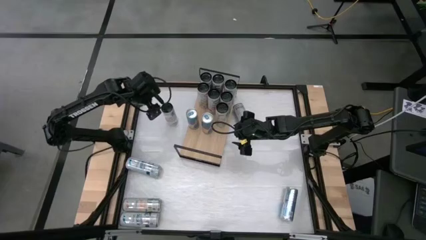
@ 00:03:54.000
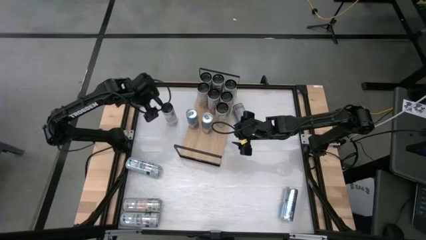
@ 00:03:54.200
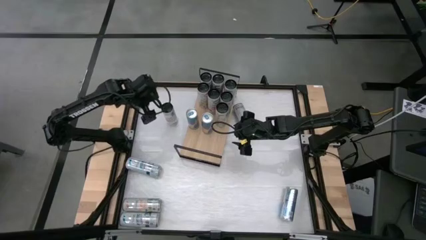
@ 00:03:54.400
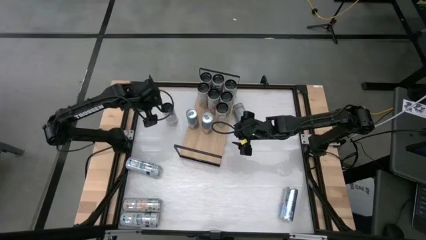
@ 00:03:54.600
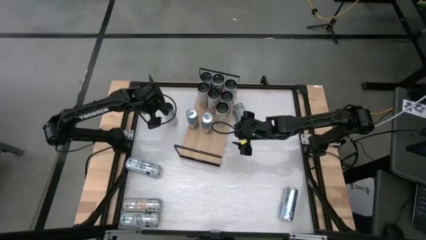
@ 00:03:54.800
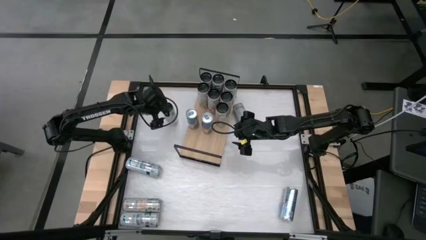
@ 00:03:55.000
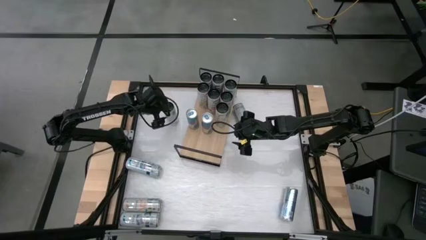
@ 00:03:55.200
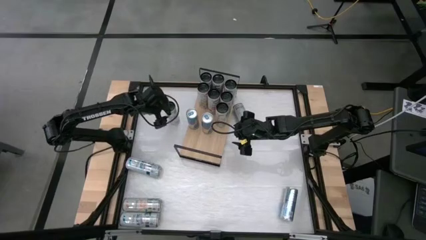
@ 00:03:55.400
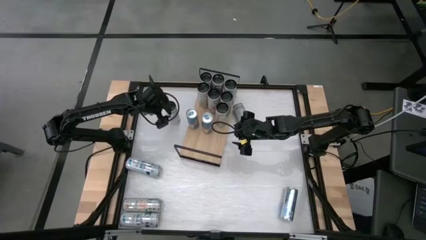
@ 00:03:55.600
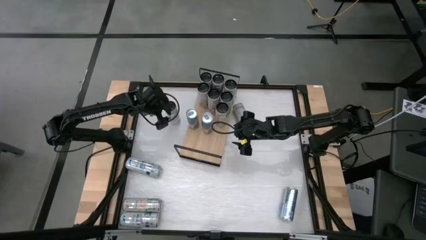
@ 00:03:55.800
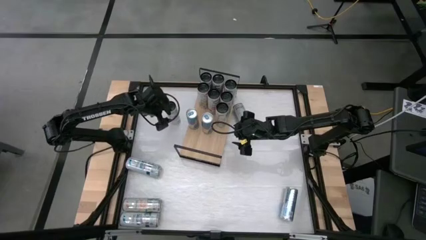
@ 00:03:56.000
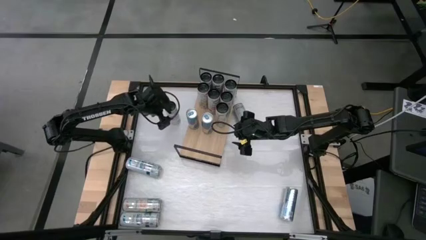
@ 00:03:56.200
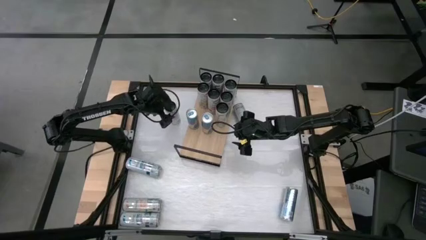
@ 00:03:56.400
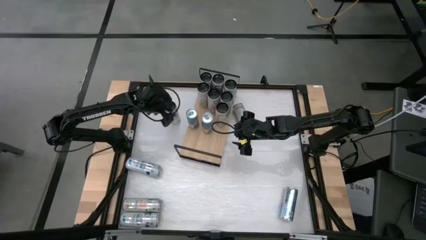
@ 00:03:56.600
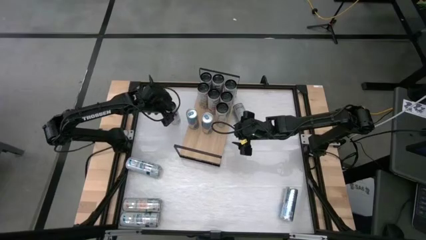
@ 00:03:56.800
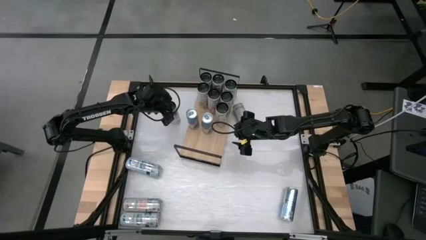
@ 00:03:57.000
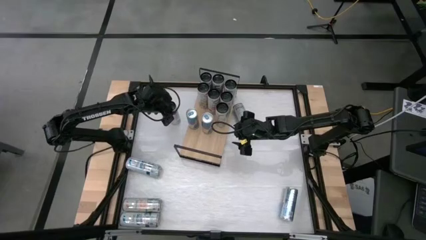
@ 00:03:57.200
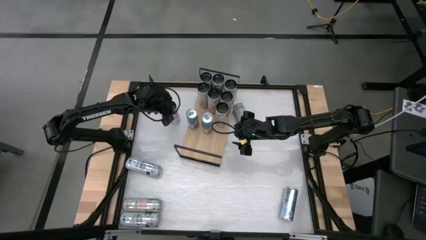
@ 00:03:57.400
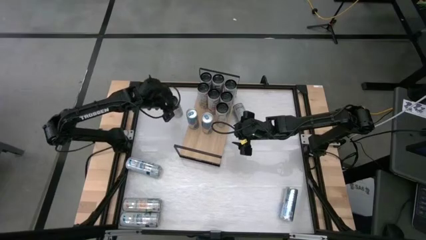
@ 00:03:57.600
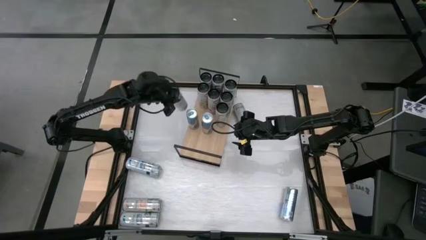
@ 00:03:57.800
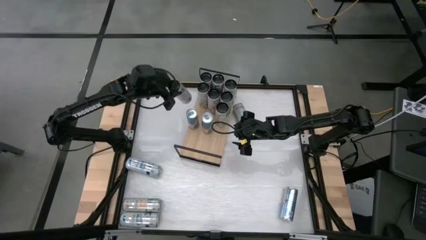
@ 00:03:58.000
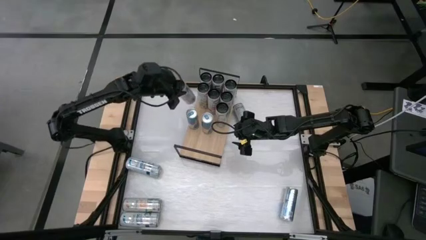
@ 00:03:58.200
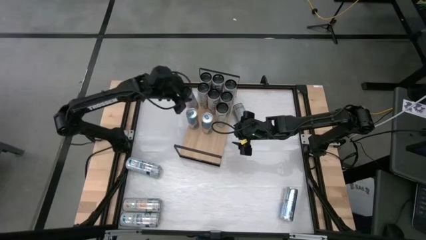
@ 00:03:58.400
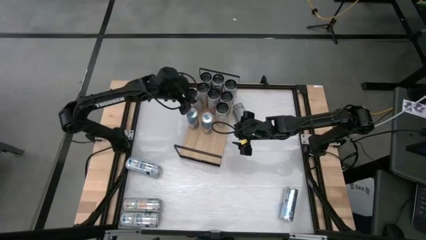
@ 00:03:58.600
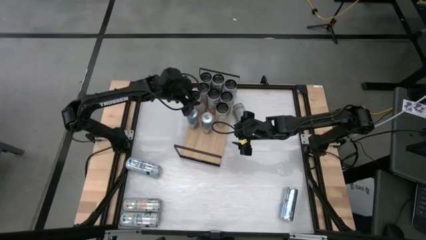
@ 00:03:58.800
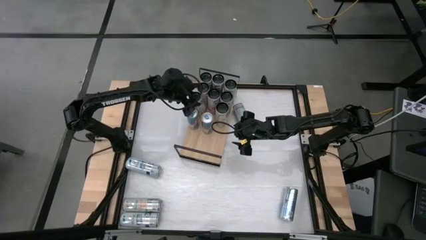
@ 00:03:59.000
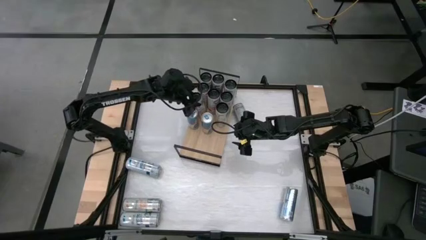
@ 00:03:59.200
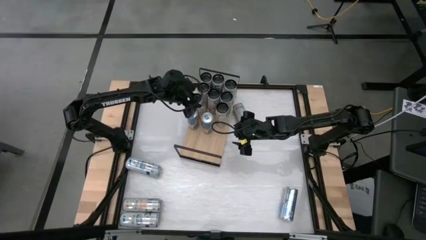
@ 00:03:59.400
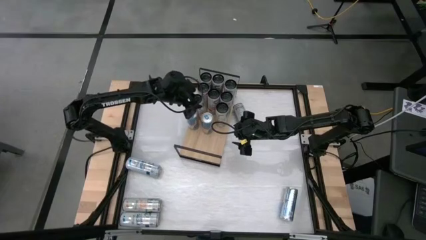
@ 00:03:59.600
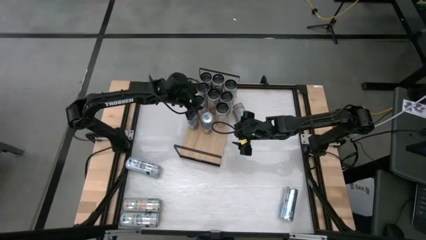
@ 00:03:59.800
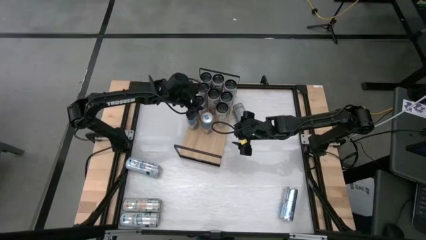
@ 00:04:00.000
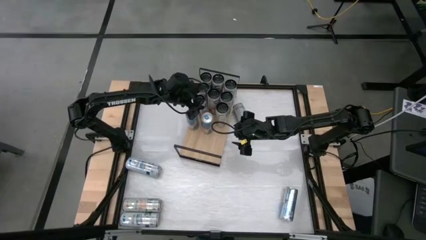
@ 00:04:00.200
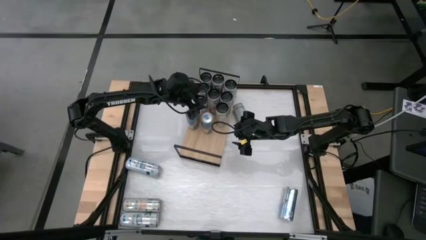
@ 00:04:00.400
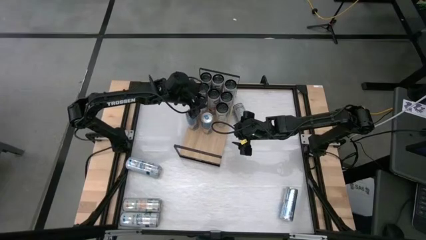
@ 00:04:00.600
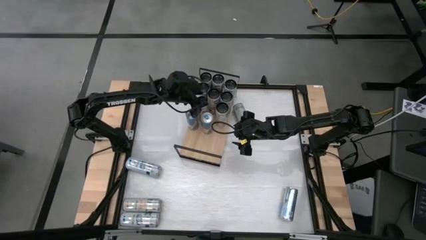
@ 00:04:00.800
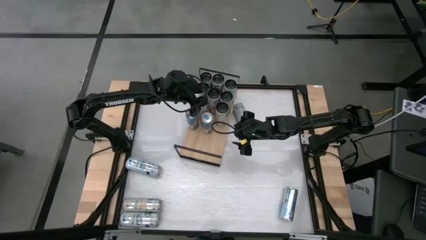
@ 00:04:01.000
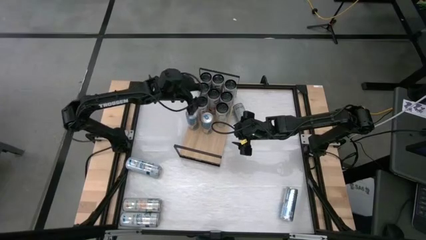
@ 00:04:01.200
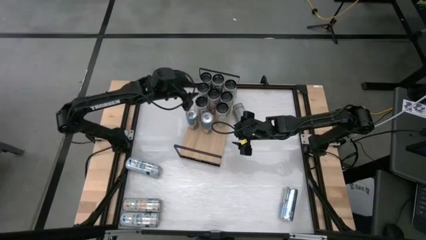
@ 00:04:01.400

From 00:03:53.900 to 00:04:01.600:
Task: Place canned beverage on shelf
Put the bottom left pink soda can on the shelf aligned with the other pink soda can

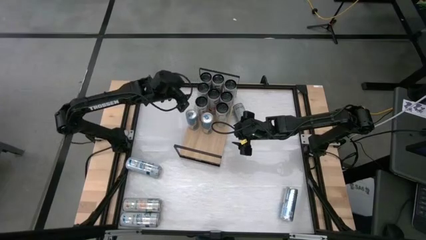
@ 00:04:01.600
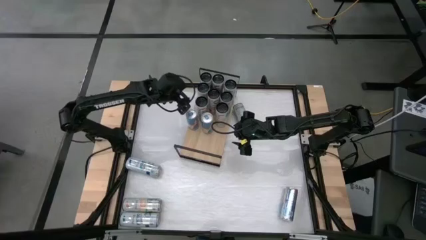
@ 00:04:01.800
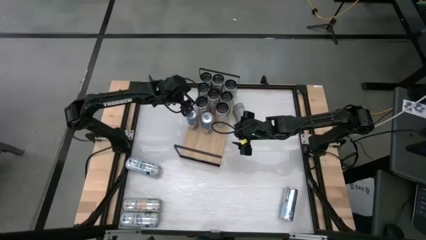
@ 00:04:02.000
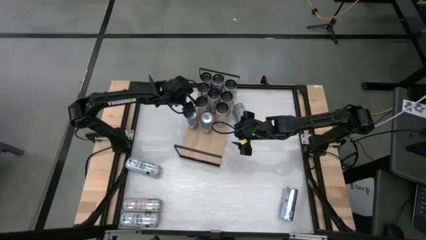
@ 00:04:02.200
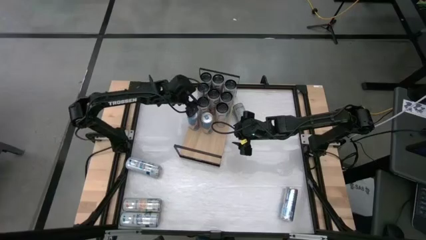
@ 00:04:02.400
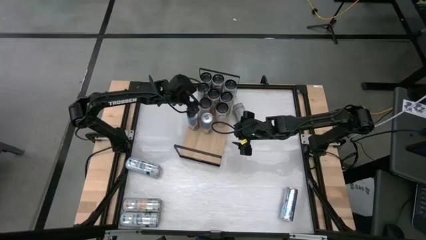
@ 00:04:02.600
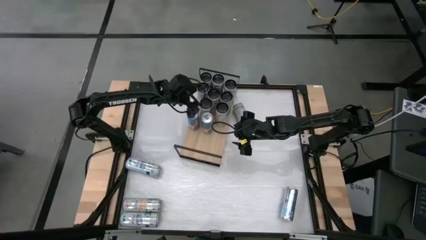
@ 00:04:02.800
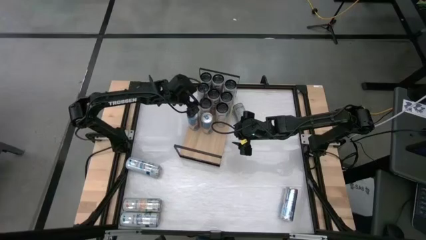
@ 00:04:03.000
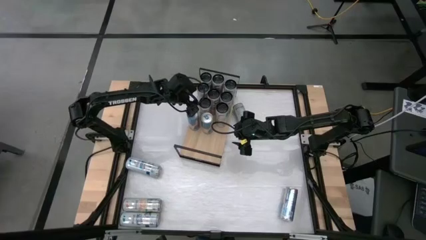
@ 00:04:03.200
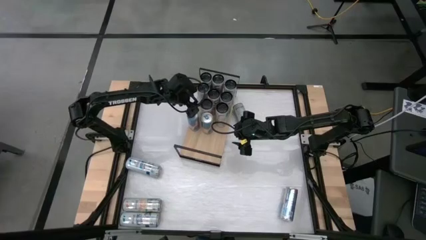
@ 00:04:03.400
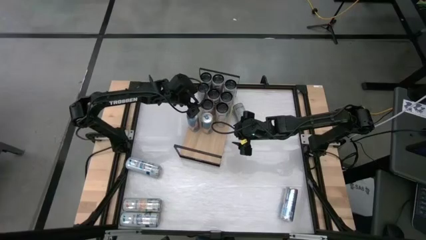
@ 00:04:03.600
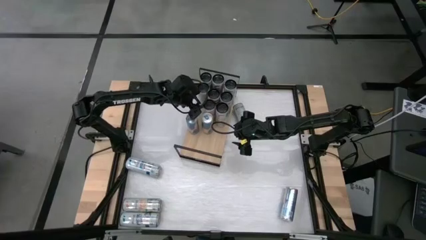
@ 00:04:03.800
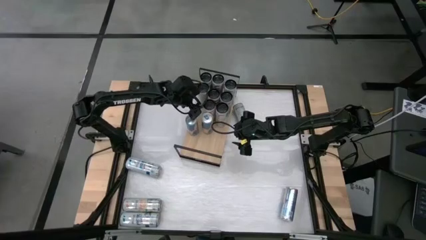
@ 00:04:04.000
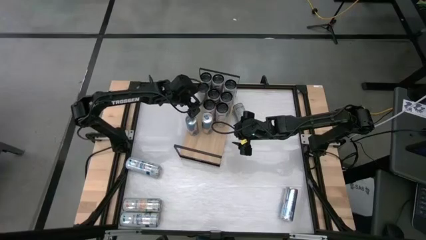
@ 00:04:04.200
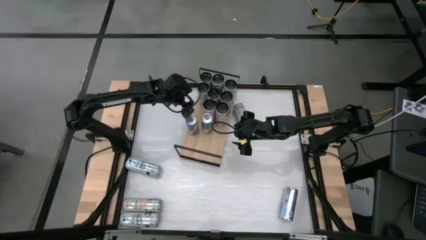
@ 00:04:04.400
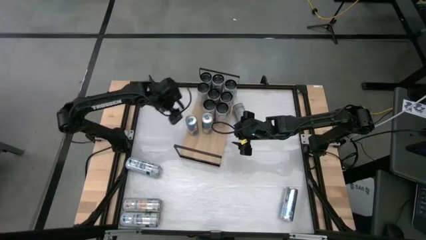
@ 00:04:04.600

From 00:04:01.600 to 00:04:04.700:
Adjust the pink soda can

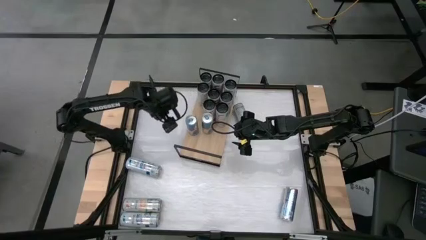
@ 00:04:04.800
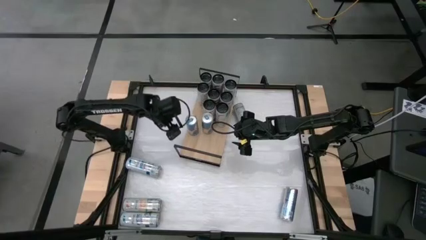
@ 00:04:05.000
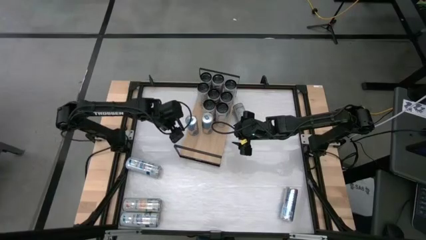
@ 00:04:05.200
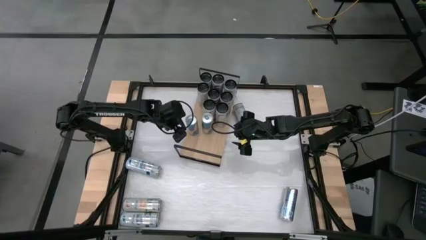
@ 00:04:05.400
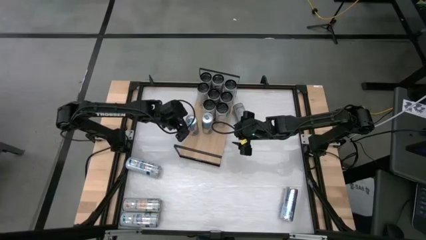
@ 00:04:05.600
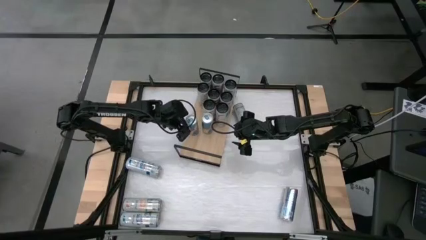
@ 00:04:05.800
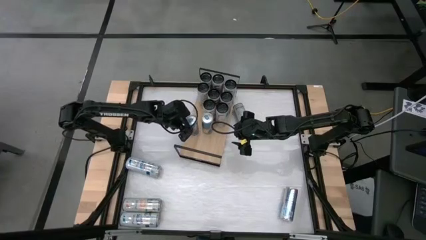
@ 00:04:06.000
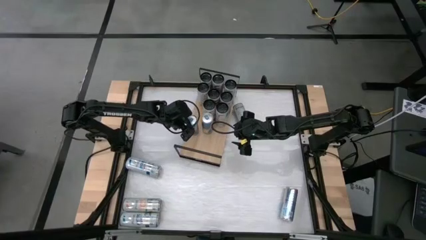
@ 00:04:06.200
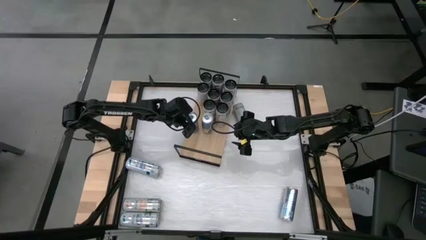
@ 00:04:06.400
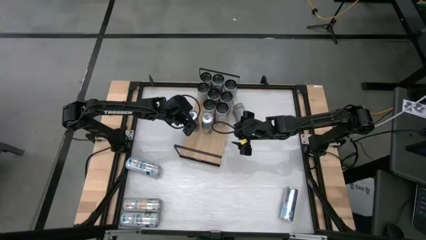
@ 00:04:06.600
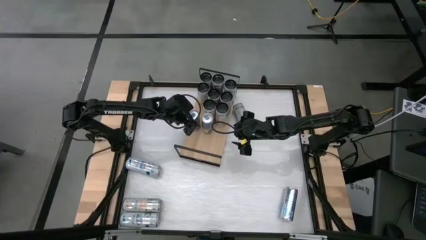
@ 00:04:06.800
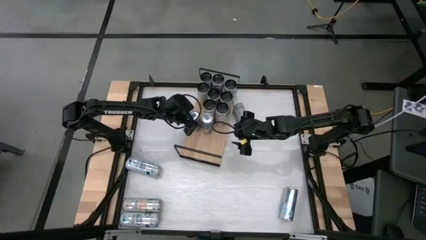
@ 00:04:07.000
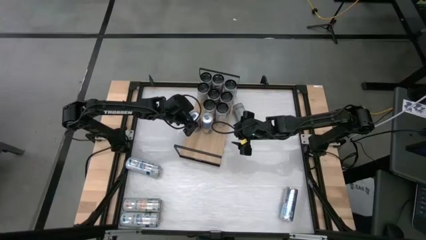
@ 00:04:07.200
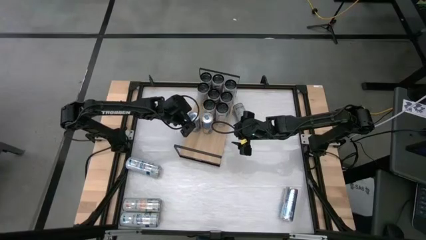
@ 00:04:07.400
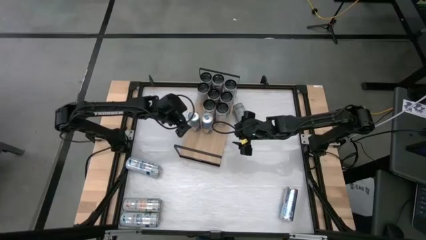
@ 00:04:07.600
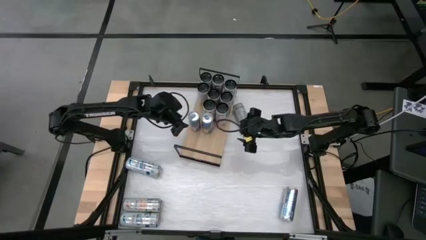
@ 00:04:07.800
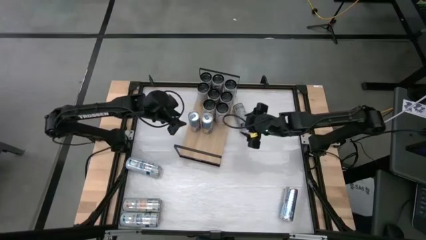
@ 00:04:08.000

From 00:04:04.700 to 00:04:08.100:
Adjust the silver soda can
